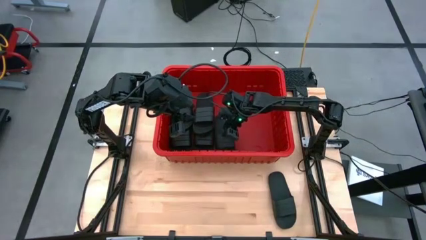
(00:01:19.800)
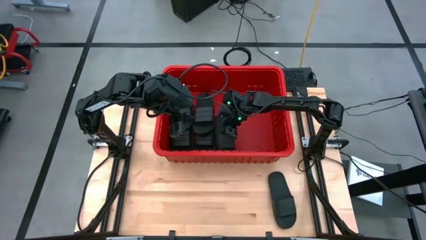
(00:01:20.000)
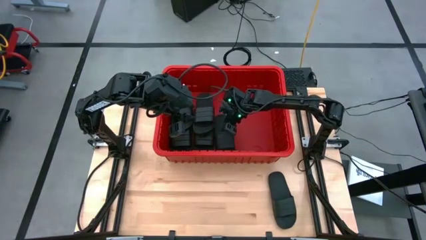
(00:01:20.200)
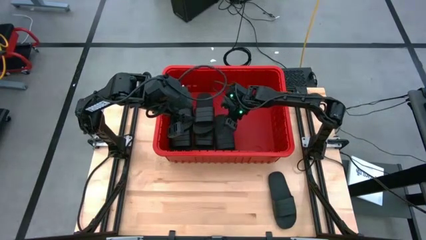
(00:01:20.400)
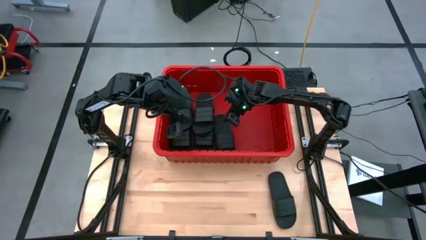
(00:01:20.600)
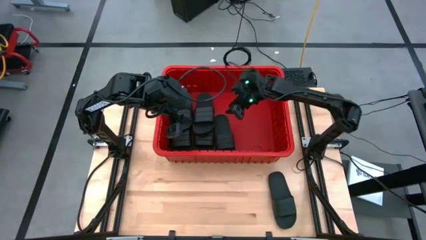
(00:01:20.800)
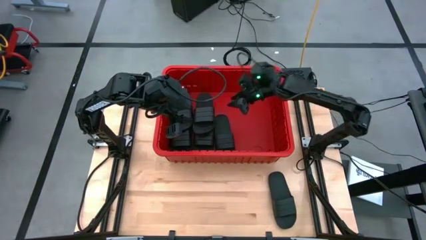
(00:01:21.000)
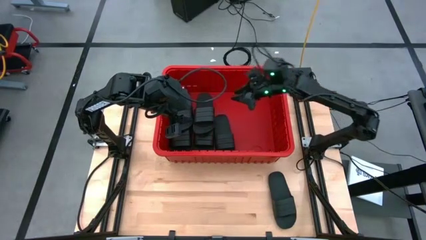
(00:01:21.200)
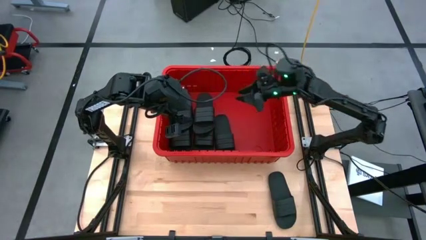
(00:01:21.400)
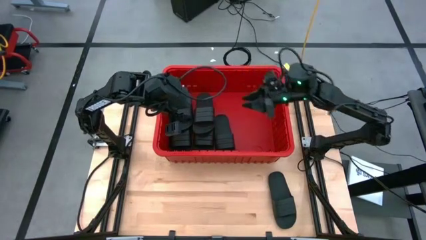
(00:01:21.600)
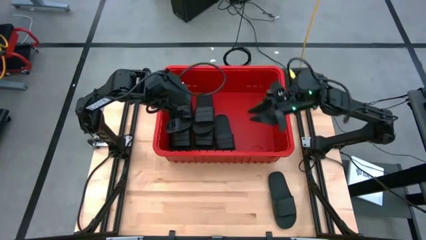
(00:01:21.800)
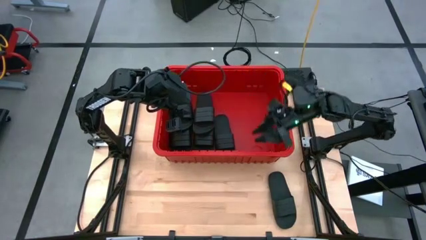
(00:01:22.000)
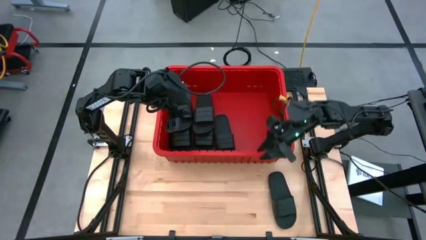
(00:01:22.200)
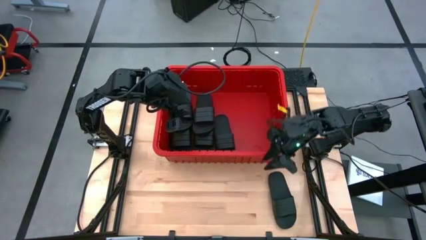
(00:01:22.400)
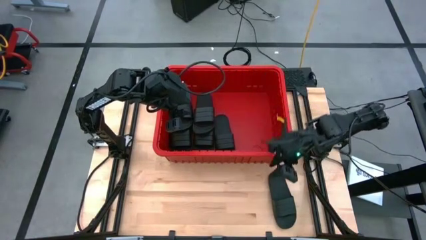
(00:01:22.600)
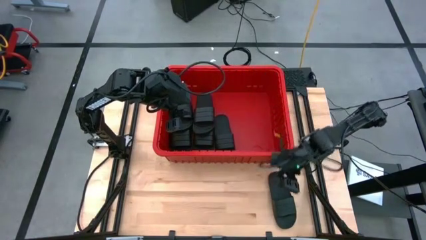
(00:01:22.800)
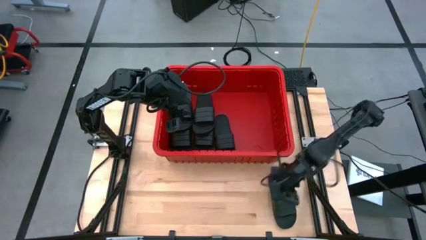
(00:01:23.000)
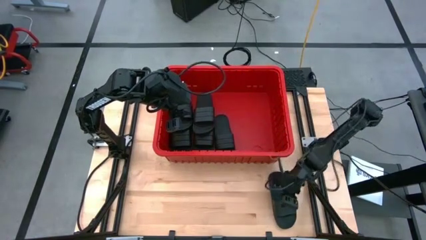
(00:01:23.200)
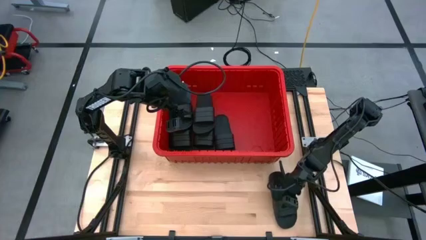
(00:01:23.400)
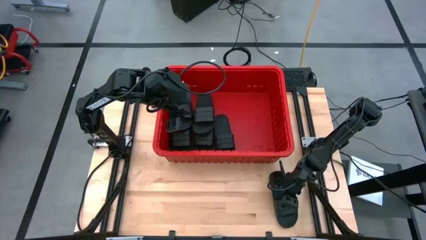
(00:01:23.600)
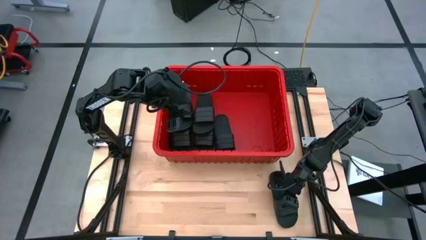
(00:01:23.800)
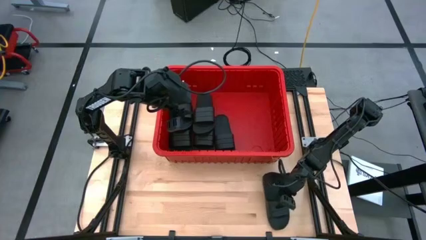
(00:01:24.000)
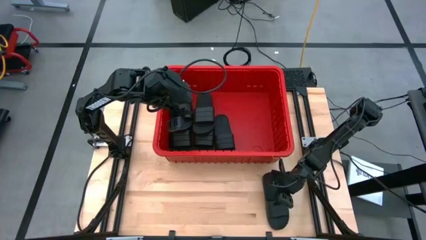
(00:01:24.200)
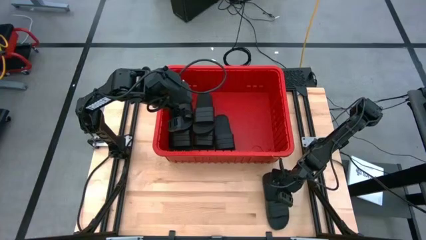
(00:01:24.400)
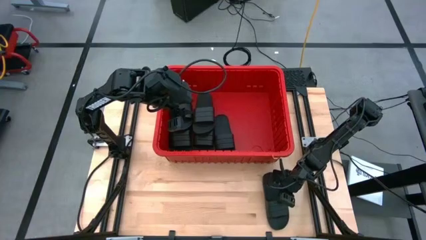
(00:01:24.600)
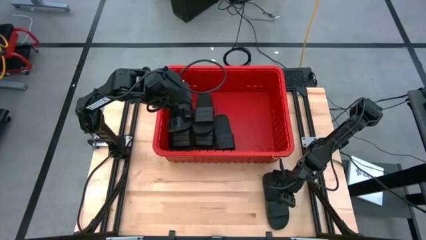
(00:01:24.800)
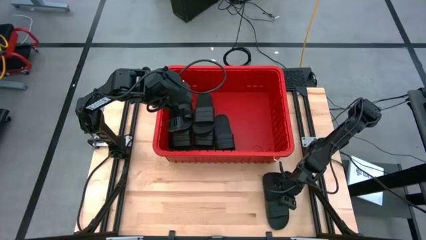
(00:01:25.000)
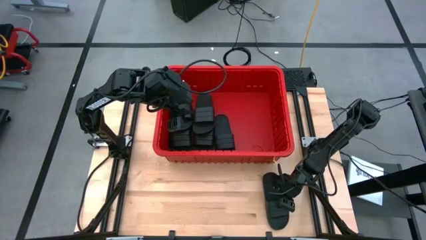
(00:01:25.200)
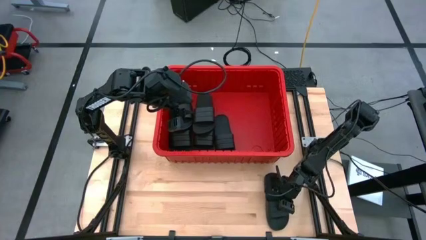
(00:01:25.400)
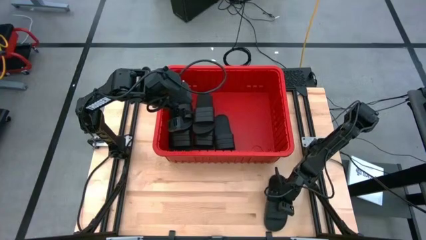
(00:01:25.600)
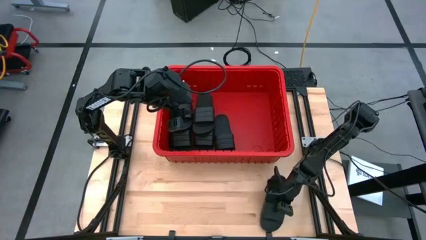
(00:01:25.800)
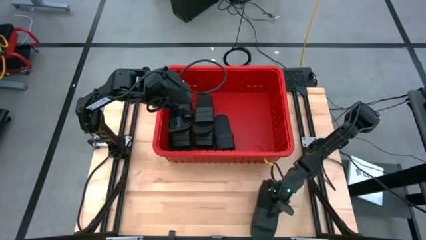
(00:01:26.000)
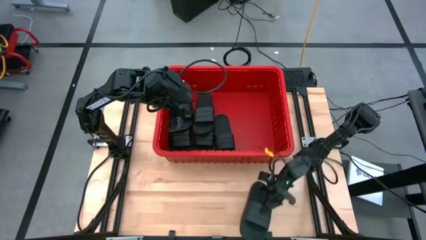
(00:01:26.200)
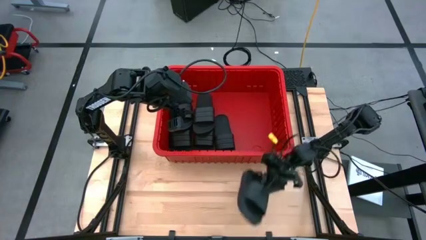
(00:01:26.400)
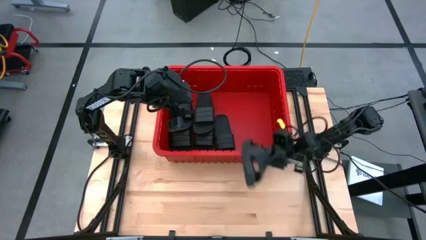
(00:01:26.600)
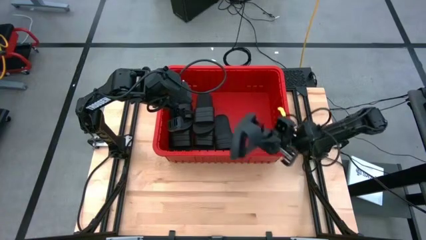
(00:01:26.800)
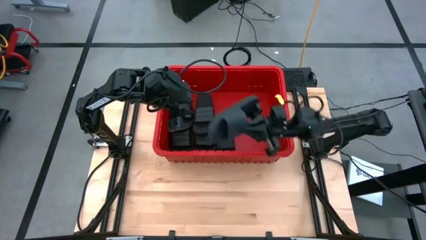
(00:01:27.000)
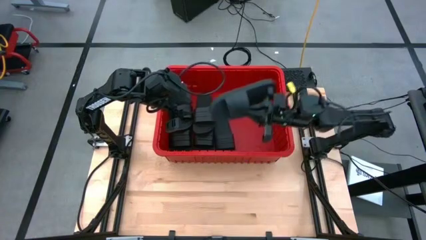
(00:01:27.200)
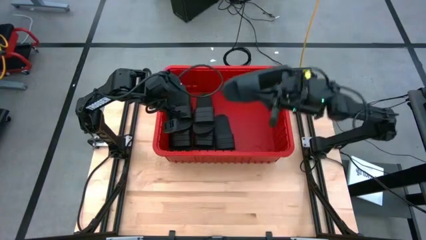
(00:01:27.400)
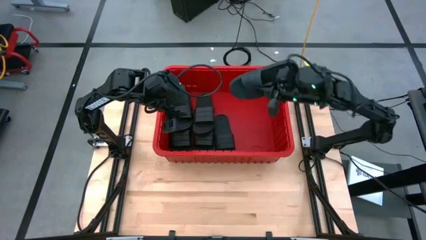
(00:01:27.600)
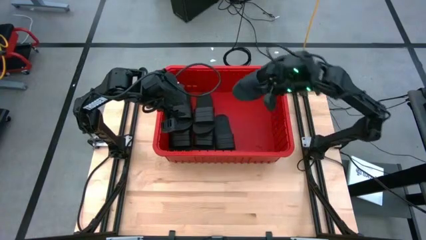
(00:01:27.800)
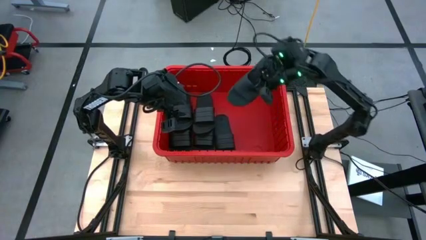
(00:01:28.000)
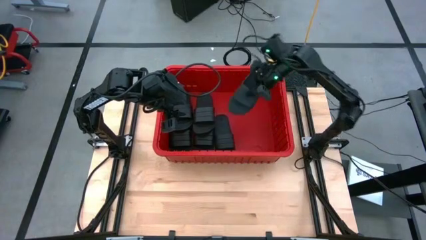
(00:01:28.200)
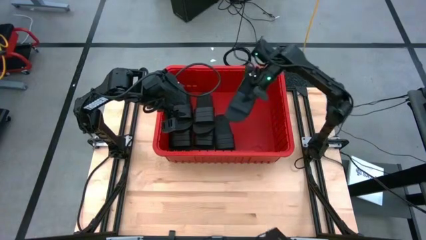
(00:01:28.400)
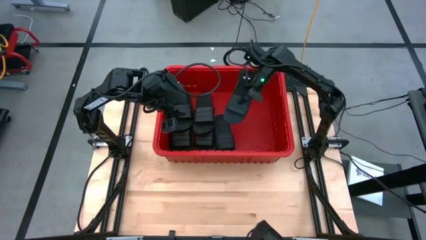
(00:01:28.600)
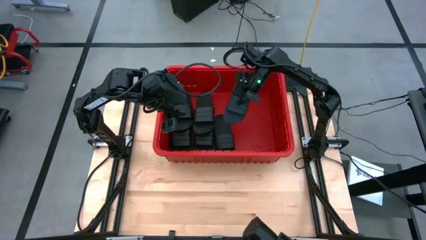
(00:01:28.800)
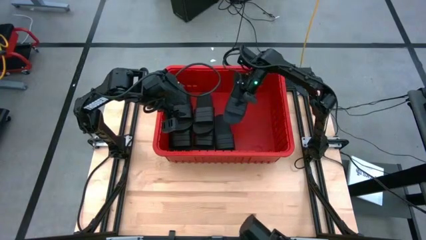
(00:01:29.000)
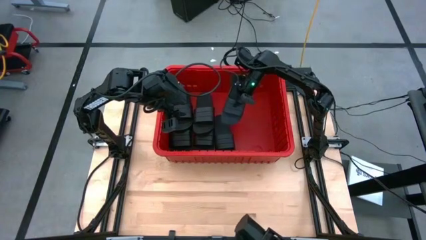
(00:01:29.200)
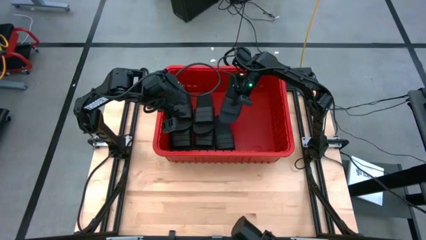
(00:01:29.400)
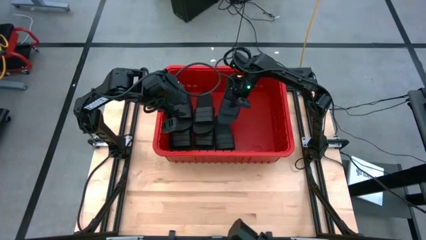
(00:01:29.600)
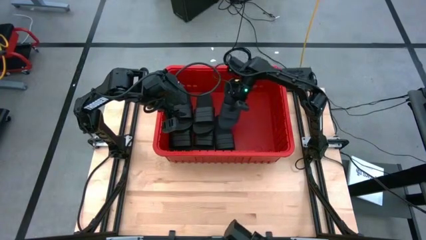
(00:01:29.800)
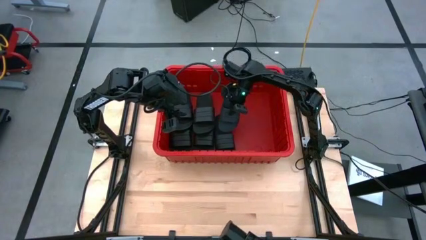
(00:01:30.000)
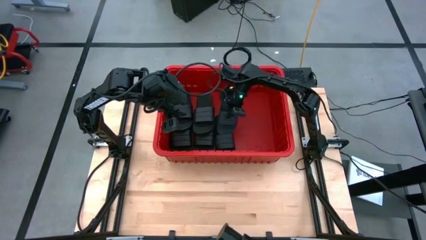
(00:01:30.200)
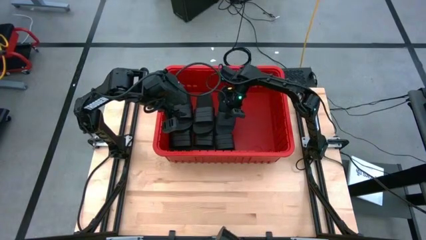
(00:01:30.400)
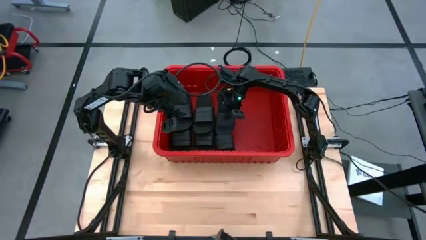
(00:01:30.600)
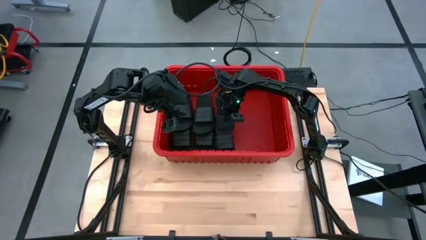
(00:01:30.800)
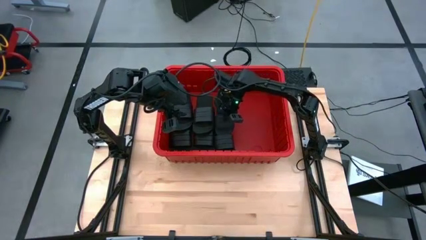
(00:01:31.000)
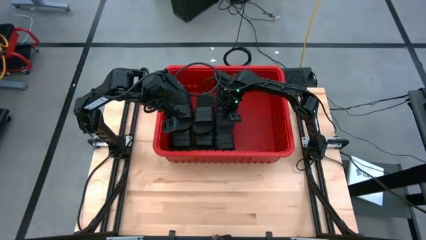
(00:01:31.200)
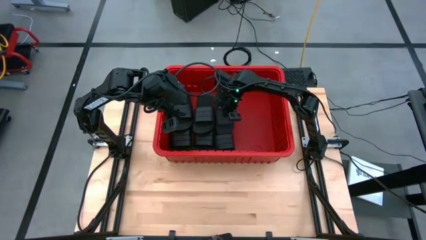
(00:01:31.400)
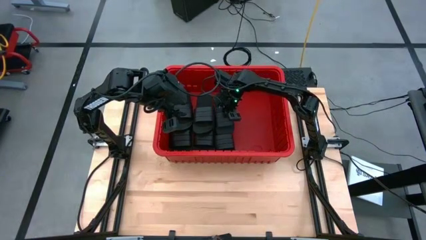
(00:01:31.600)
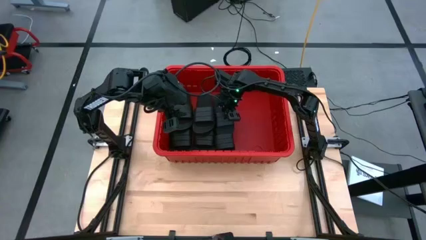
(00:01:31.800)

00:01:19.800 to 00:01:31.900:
Task: Pick and place slides into bin
Put the black slide into the red bin

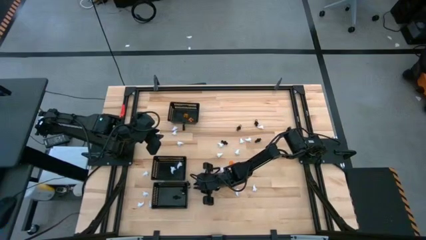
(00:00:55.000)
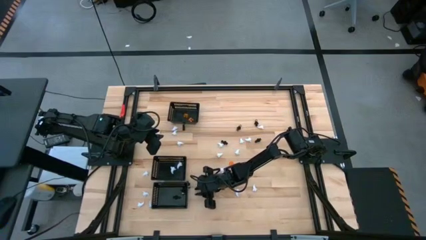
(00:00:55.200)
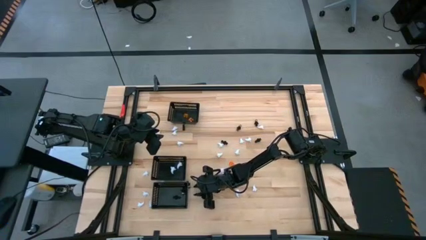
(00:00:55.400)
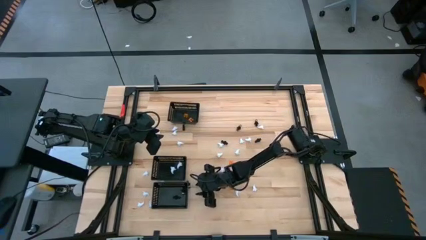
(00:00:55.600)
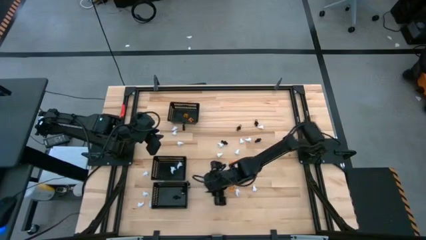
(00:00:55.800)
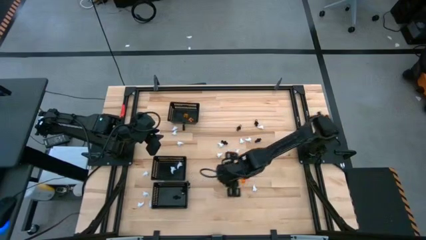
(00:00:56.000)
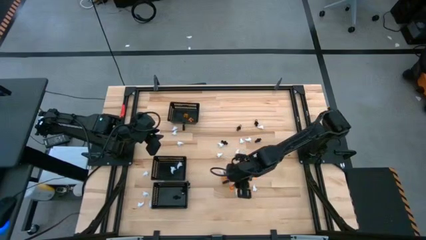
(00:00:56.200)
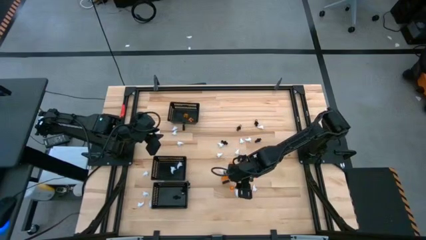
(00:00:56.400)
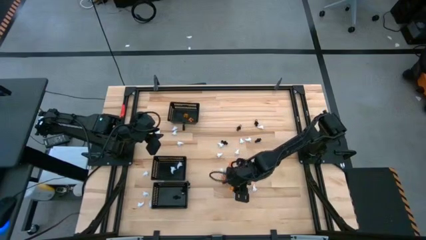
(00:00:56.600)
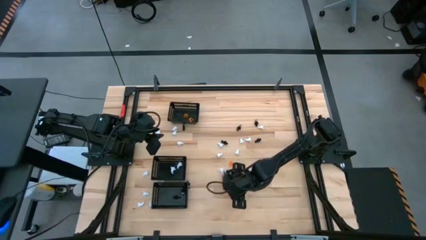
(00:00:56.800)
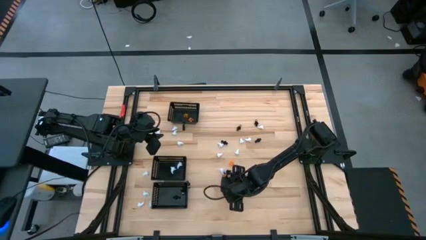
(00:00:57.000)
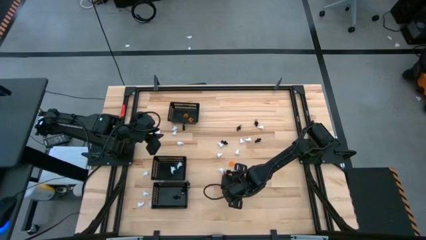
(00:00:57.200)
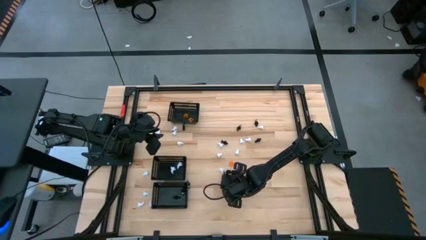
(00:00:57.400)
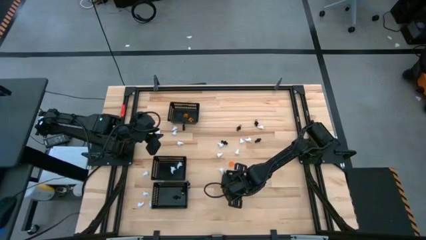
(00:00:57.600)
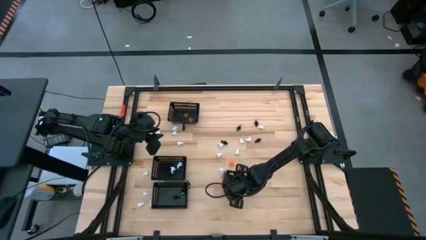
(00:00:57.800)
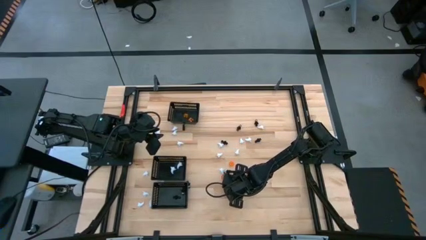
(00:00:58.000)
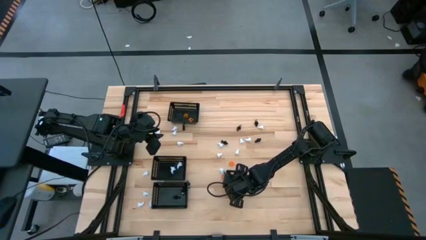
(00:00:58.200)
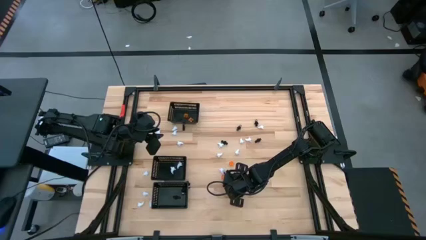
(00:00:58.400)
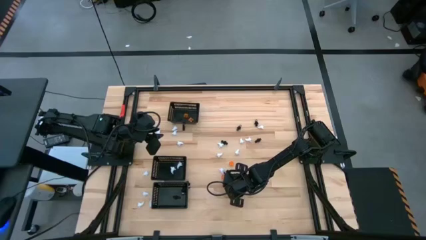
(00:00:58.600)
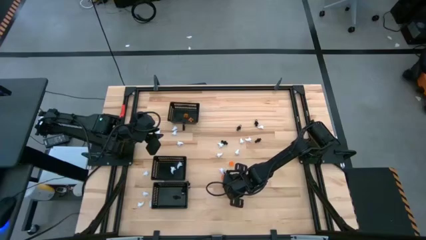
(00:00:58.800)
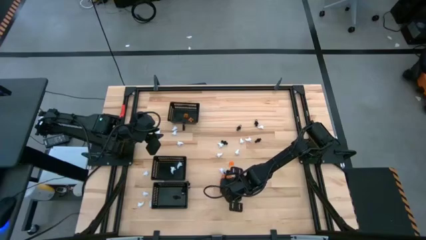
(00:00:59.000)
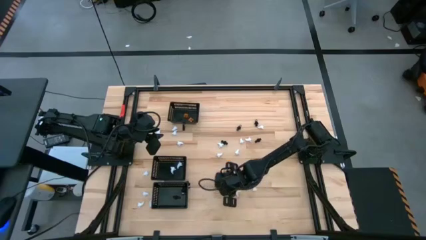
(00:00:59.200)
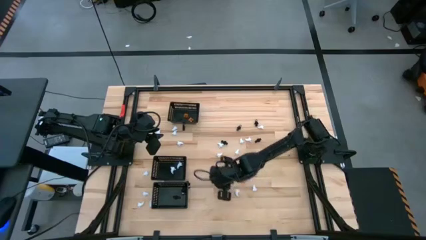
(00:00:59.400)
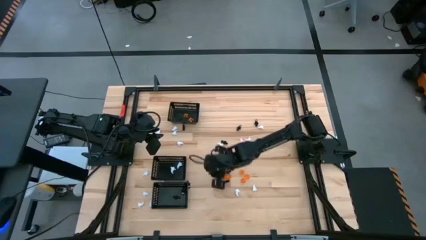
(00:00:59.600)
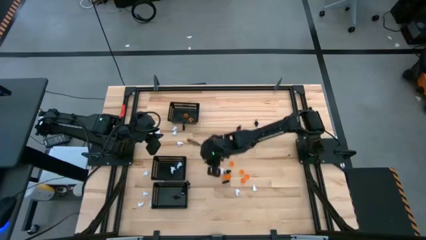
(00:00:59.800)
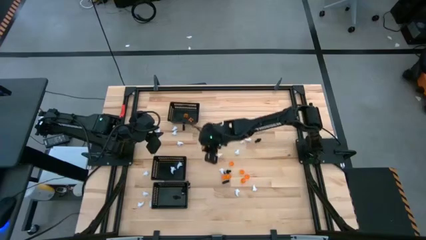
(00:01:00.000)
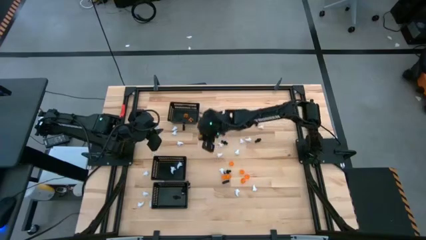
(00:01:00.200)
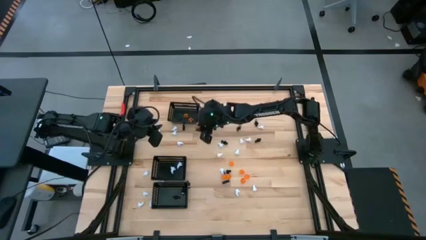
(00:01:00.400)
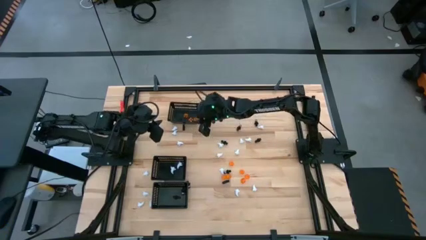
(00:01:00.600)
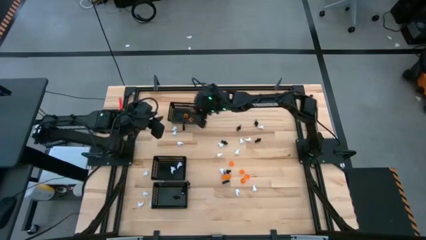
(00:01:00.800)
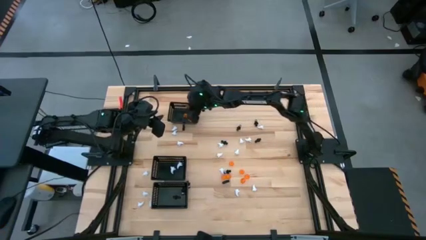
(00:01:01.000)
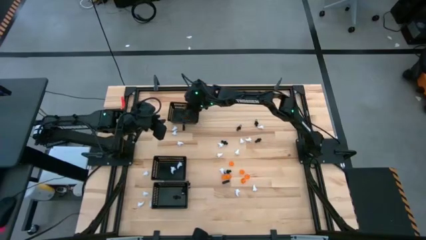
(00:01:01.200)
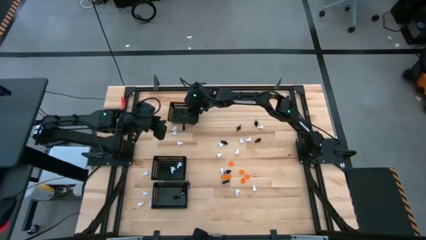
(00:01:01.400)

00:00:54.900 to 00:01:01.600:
Task: Sort Halloween decoration
Put the orange pumpkin toy into the top black bin
